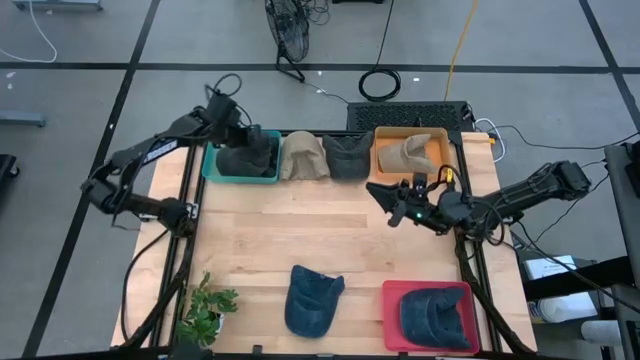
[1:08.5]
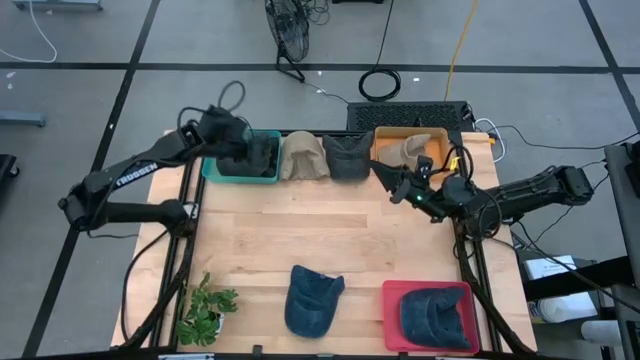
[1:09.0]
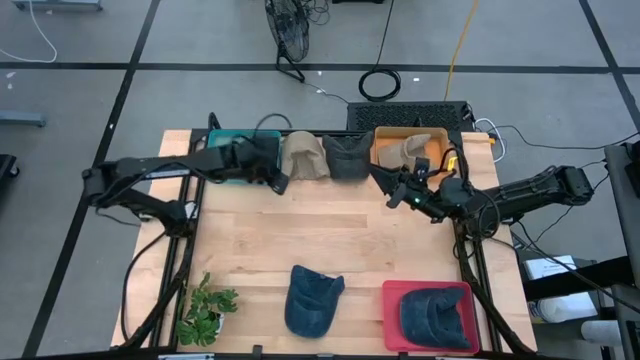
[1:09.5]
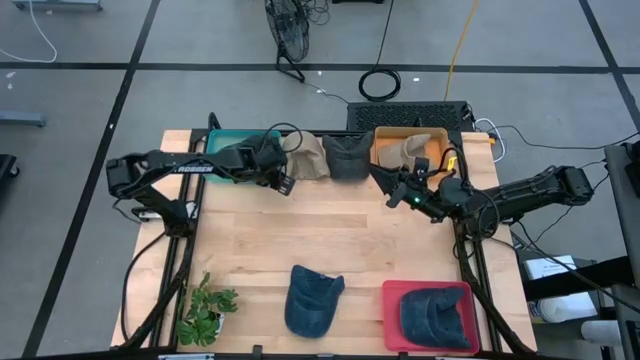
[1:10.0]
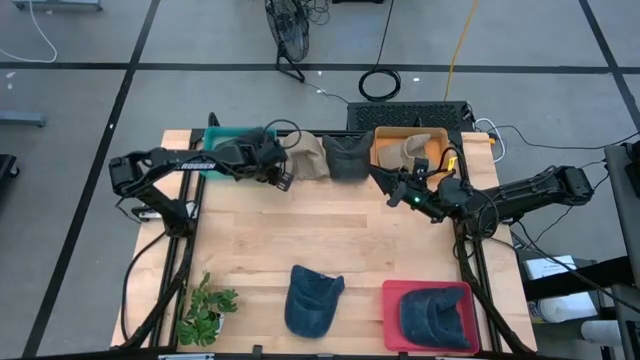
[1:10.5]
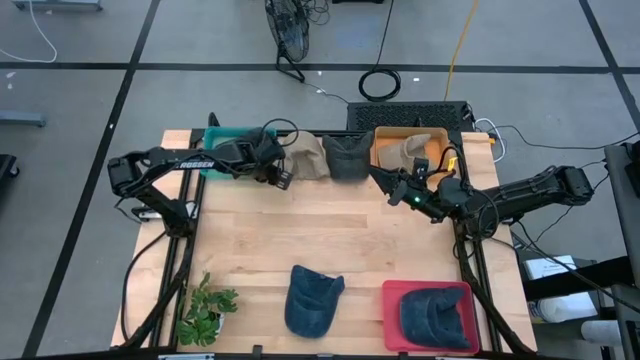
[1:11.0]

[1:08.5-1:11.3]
Task: Pick & Place hat
Adjust the green bin

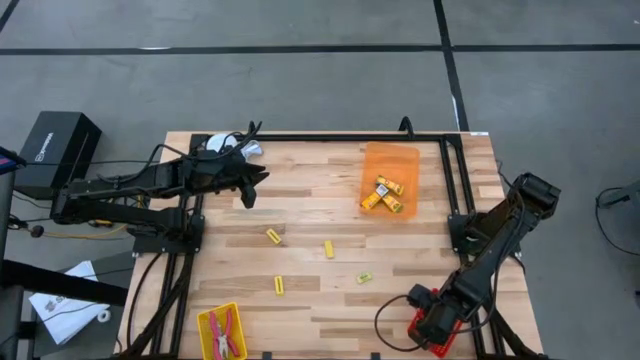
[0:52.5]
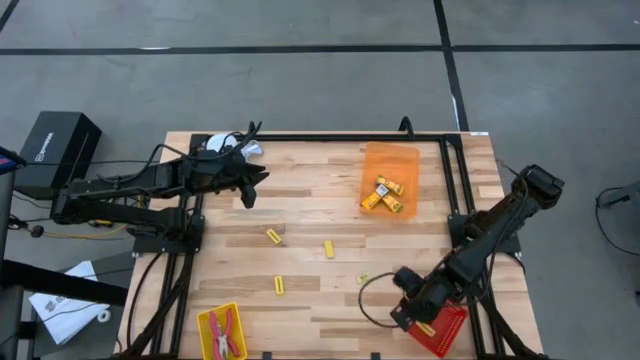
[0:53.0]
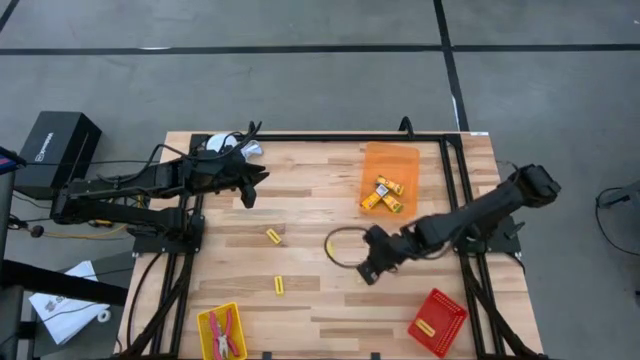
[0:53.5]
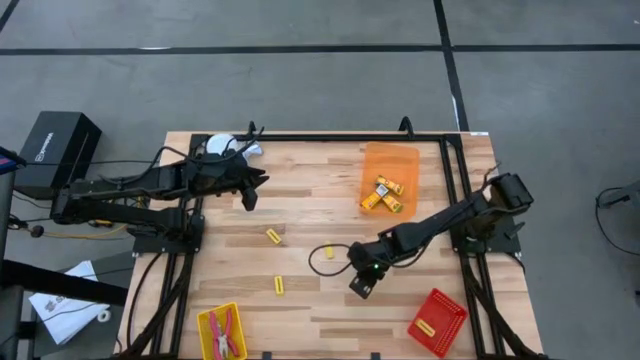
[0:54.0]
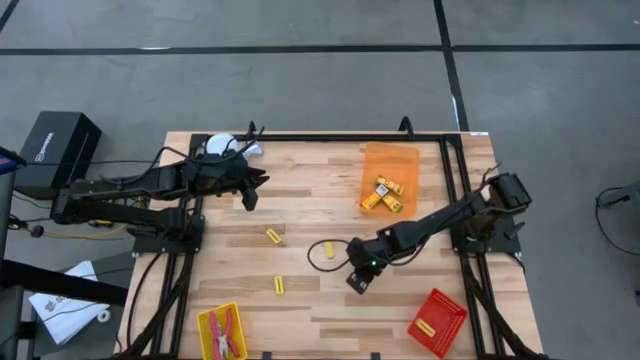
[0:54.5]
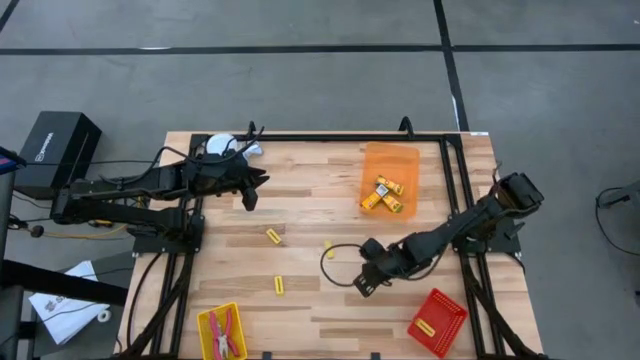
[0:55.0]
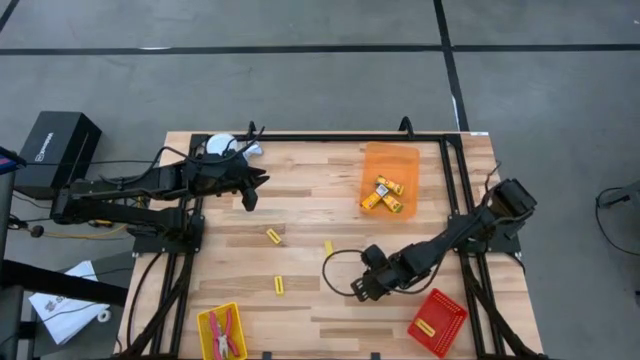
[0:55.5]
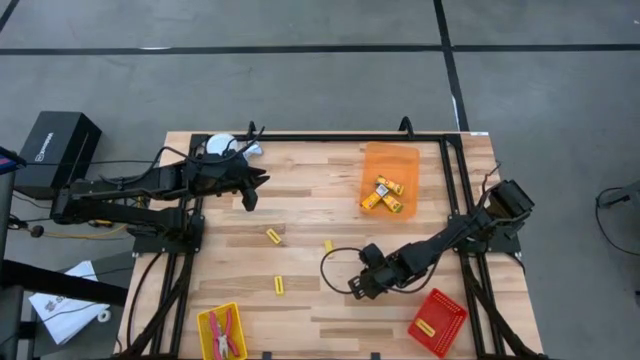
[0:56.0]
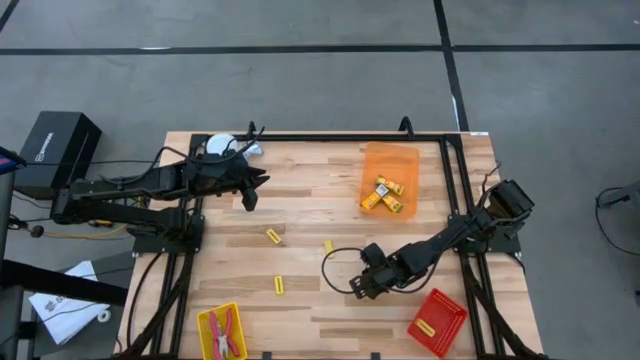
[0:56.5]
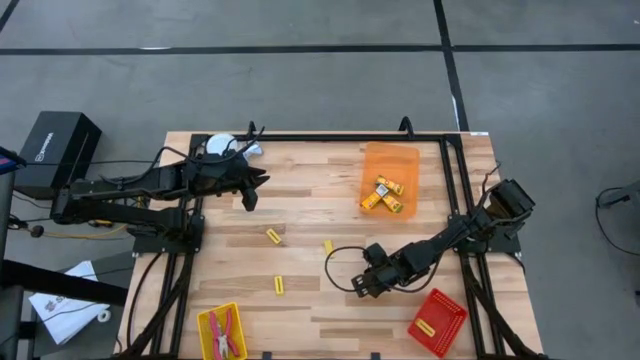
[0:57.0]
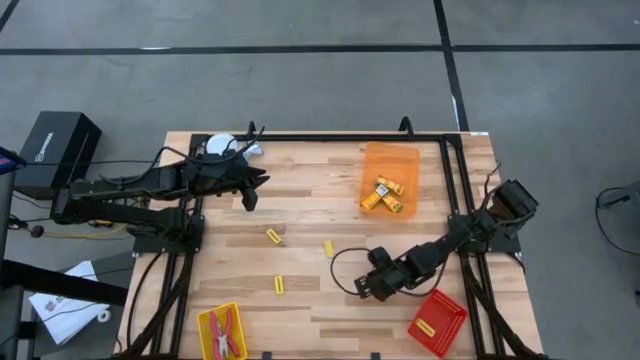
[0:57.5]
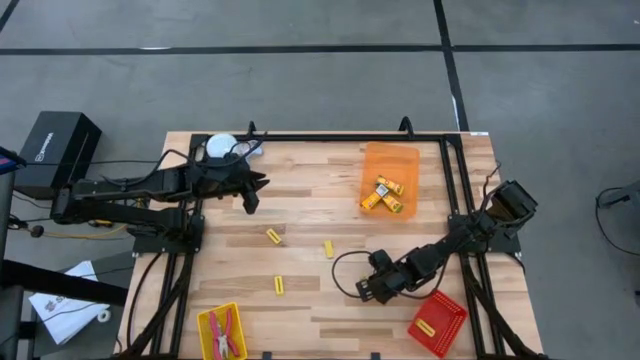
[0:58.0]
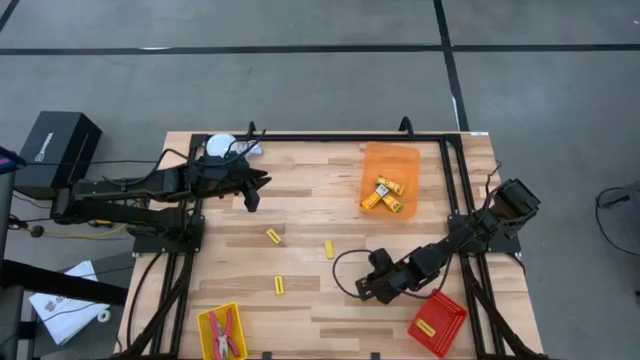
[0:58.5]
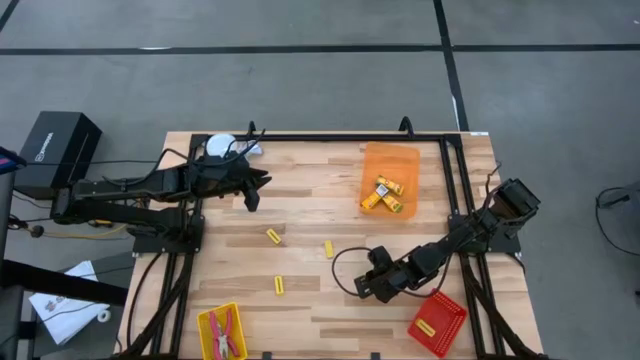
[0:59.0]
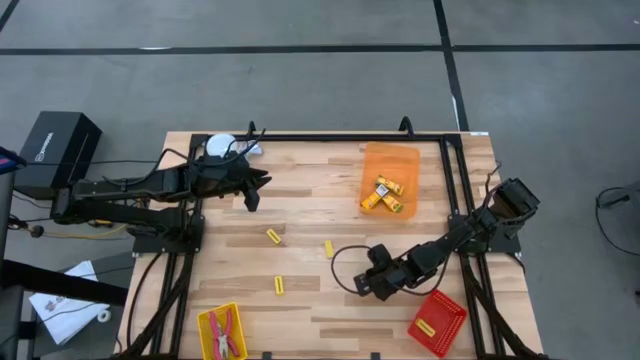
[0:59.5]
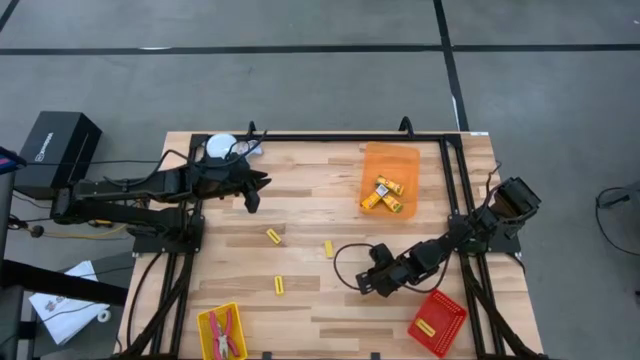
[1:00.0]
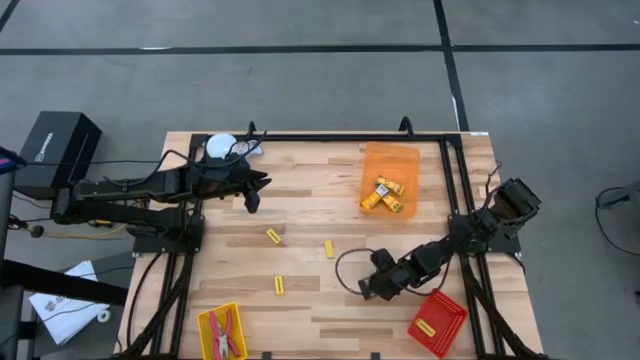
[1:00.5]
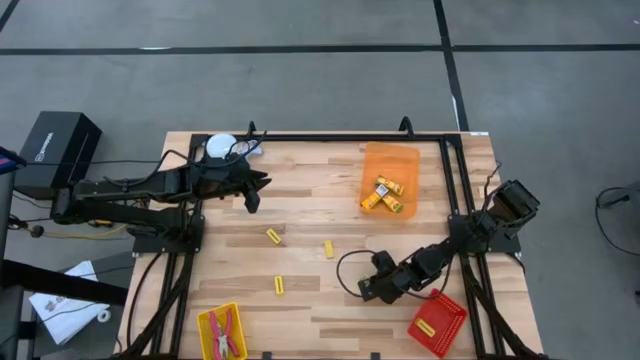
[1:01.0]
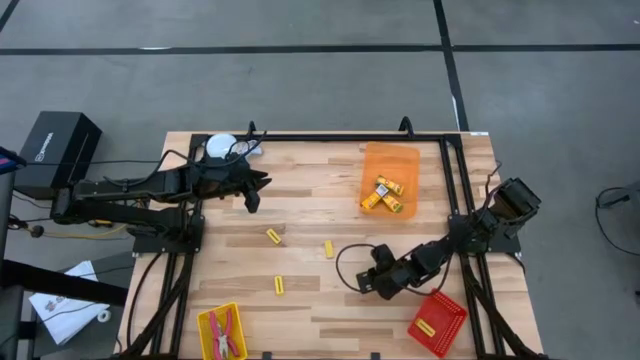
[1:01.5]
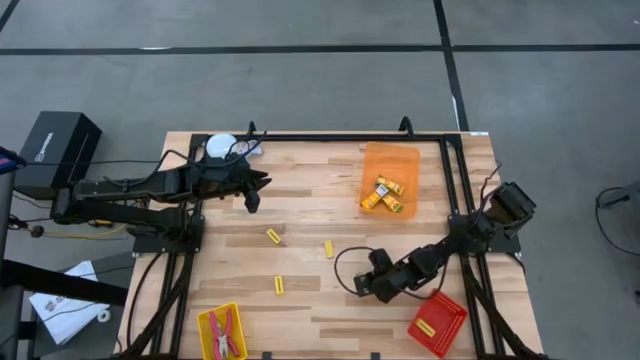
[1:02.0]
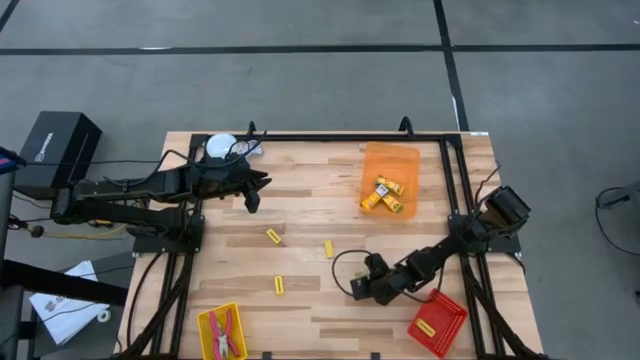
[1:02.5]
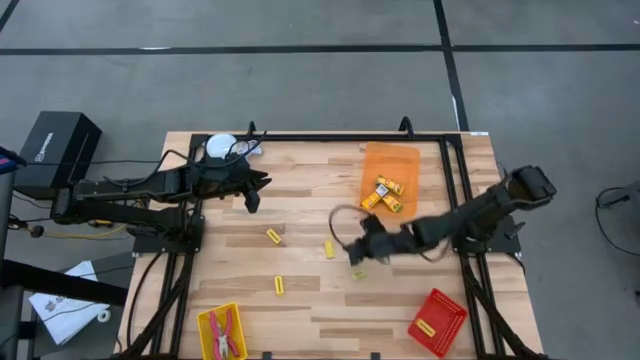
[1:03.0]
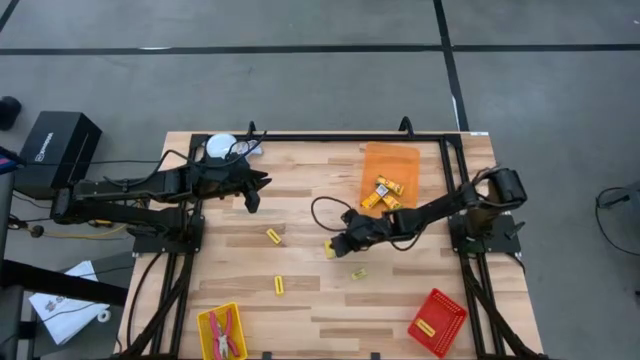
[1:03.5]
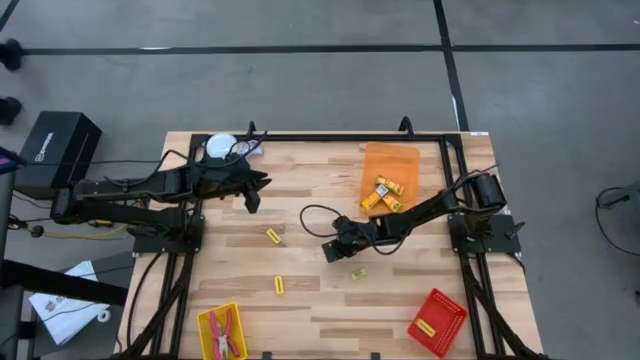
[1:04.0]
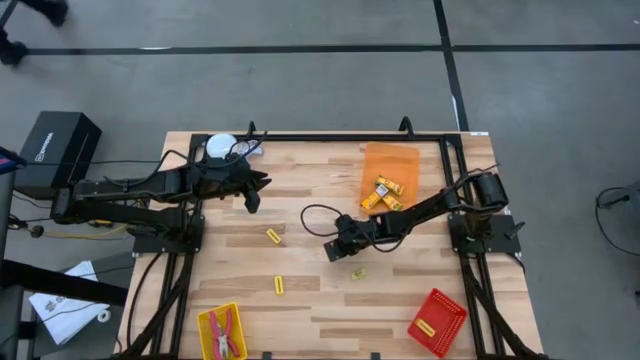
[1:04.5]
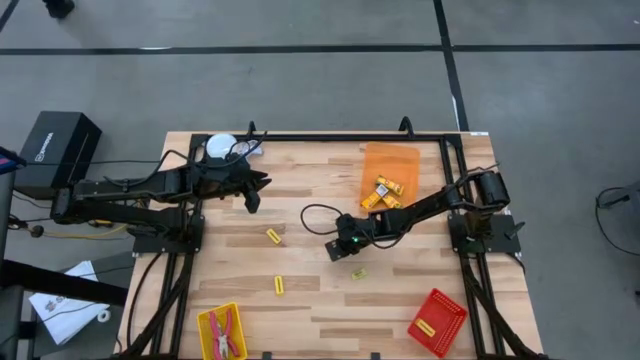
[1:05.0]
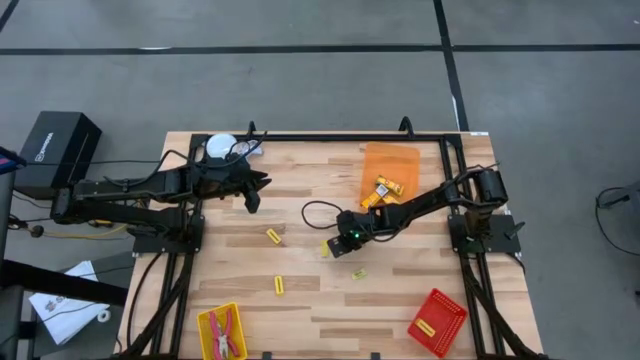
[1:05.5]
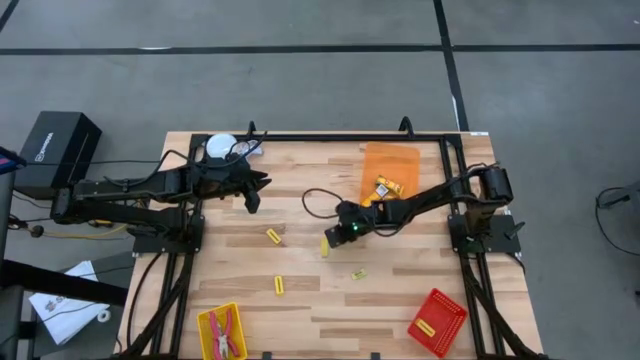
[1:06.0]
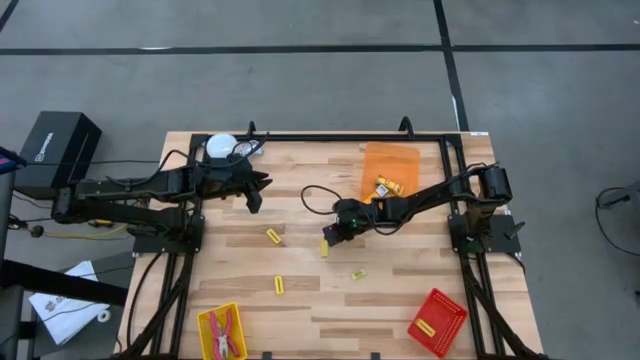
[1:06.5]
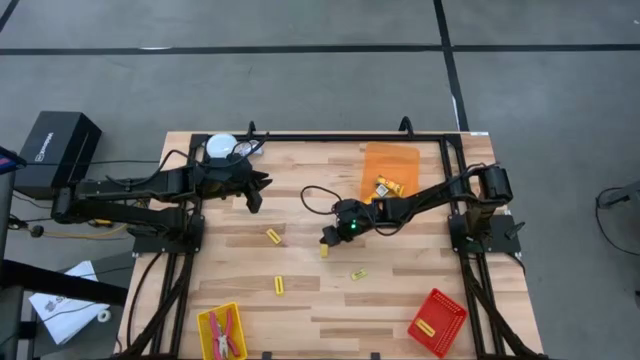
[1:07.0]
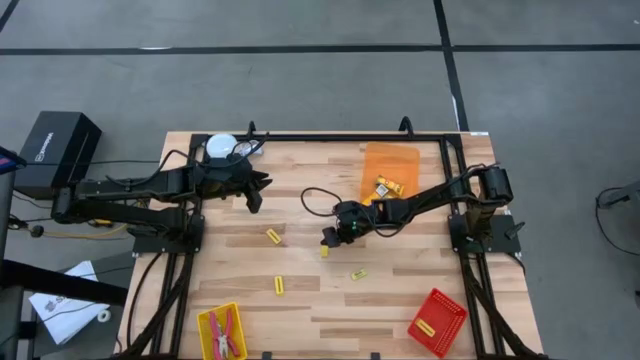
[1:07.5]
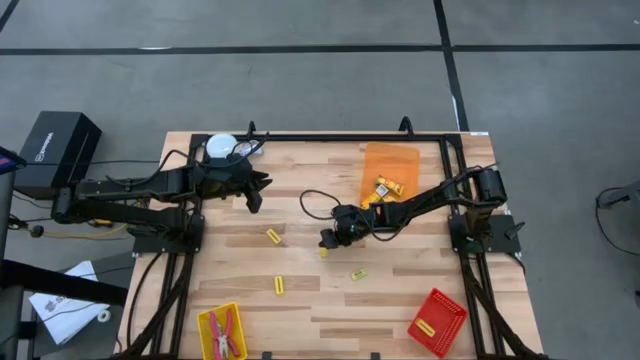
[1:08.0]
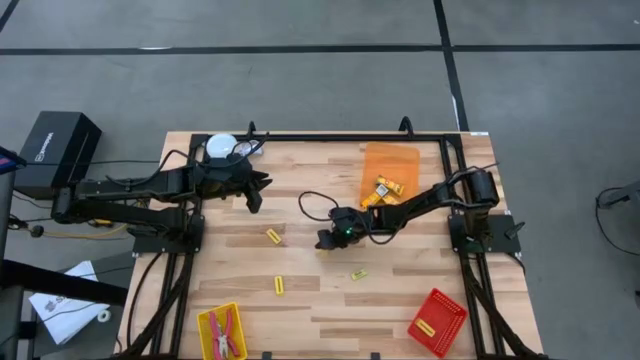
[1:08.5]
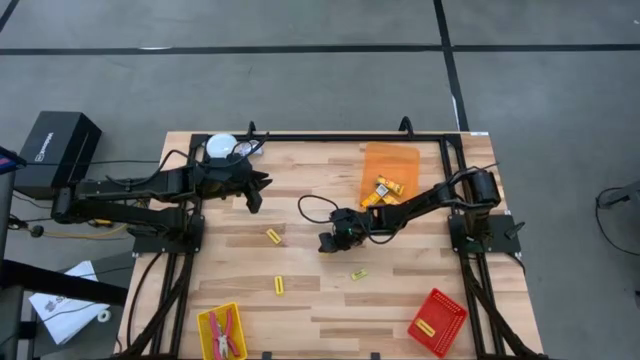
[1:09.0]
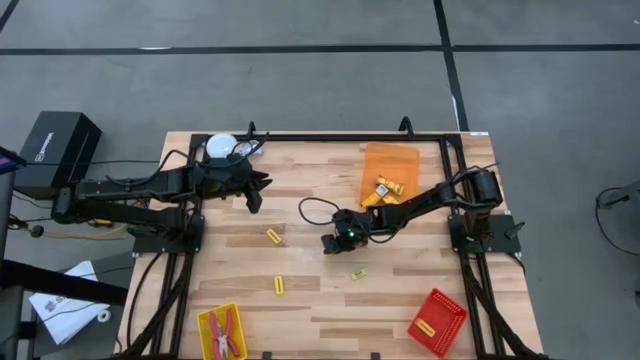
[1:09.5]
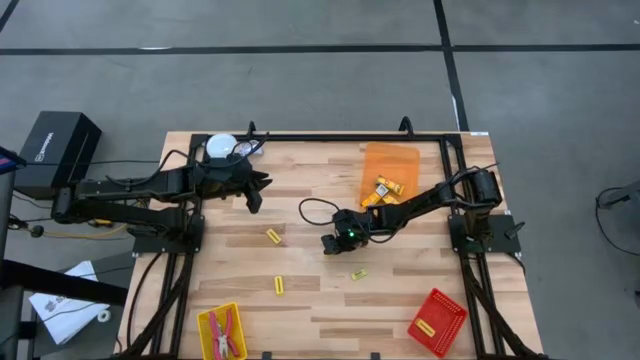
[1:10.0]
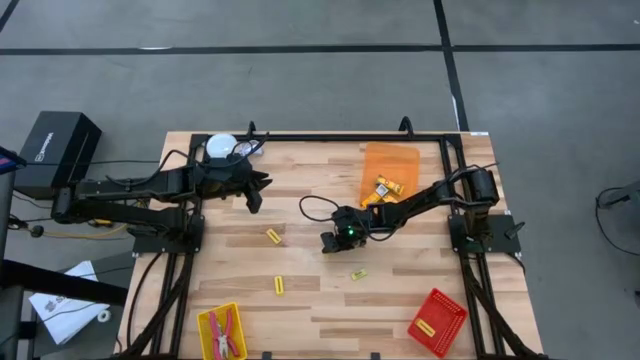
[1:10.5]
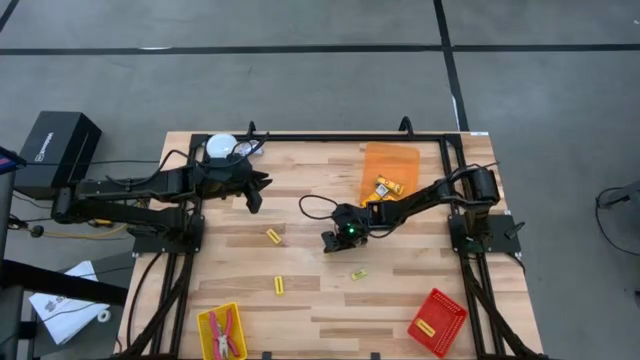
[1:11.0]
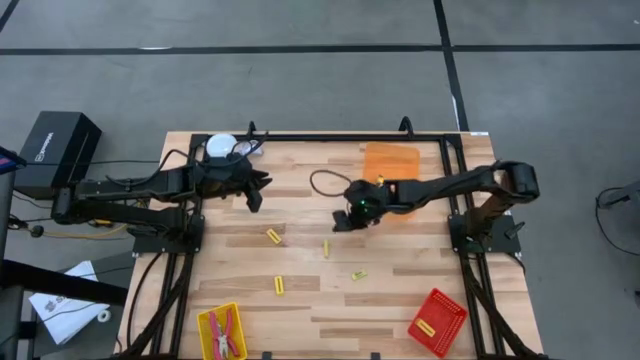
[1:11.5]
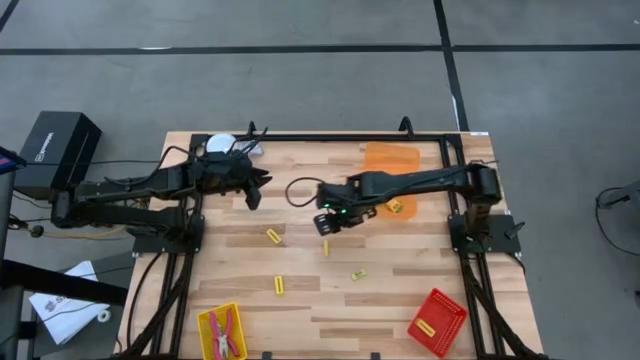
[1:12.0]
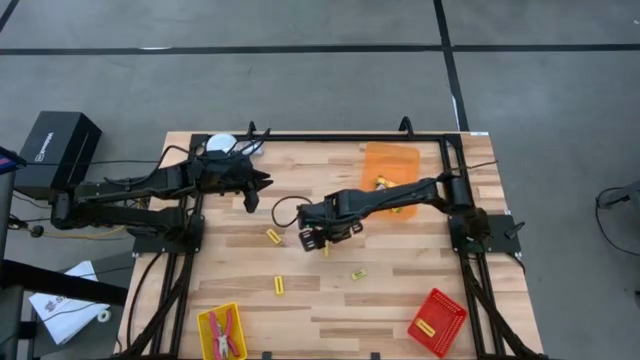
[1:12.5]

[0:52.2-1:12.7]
Task: Pick & Place School Supplies
Put the yellow eraser into the red bin
